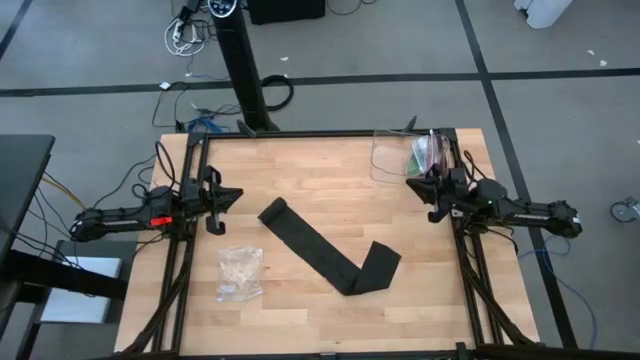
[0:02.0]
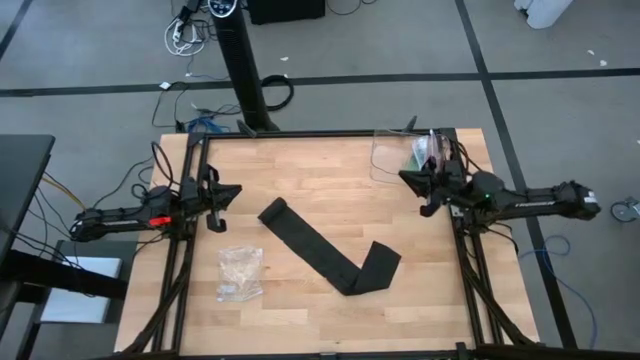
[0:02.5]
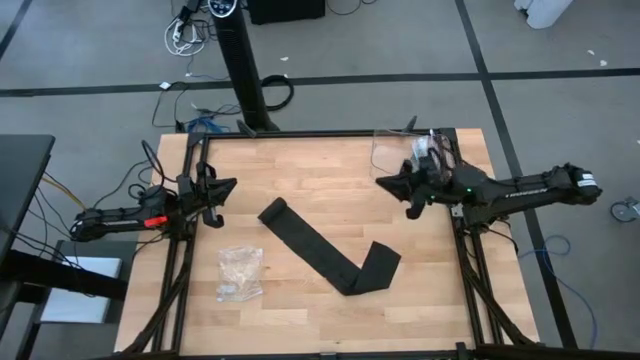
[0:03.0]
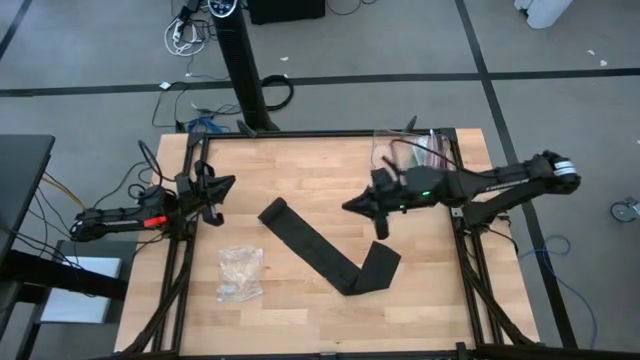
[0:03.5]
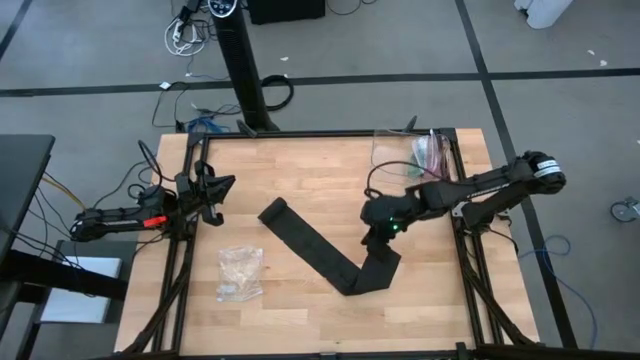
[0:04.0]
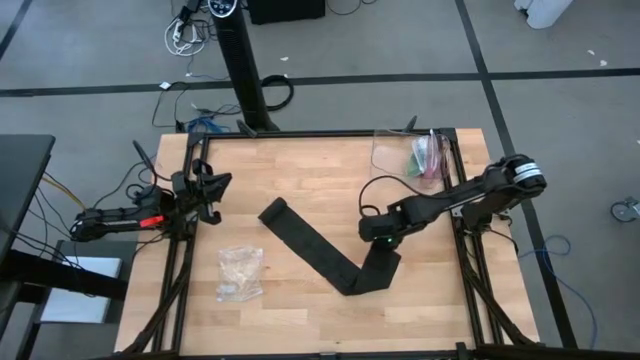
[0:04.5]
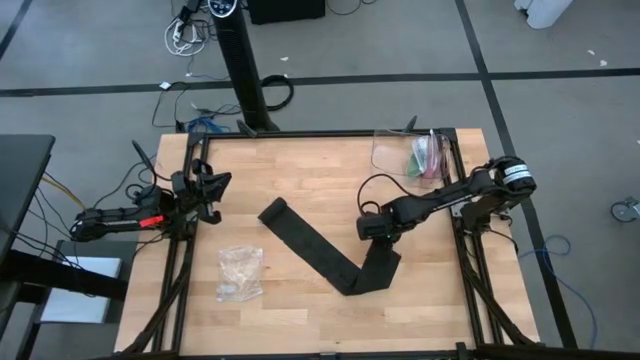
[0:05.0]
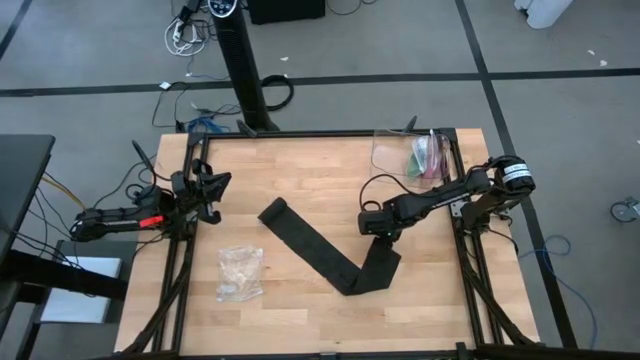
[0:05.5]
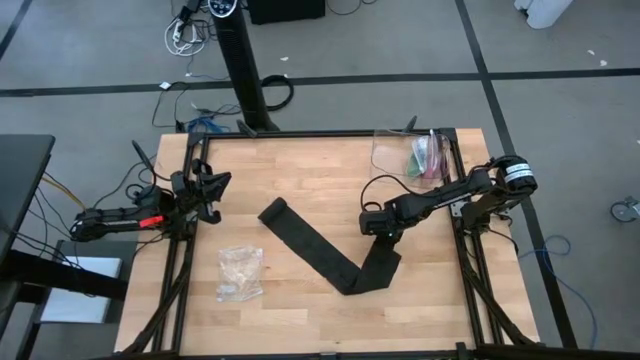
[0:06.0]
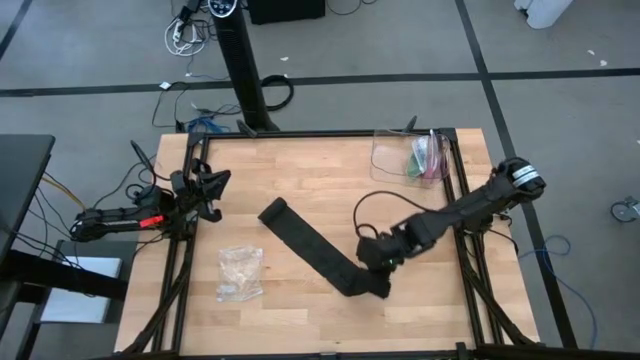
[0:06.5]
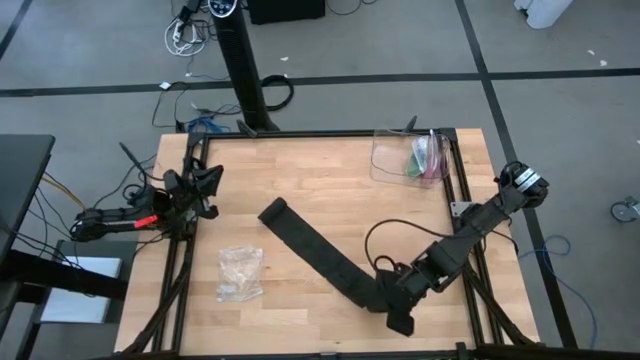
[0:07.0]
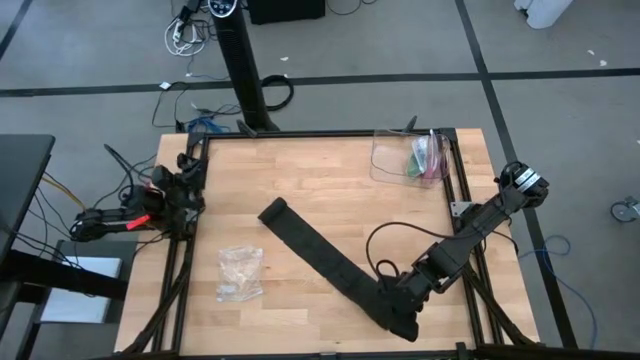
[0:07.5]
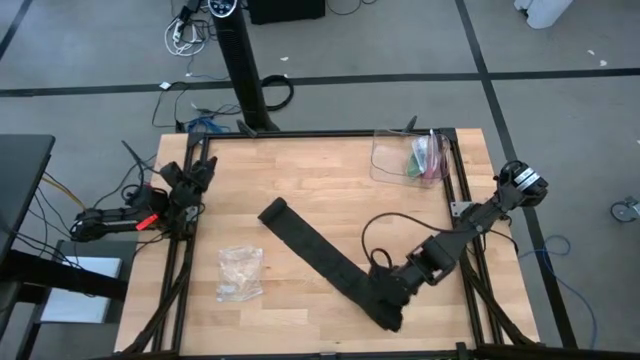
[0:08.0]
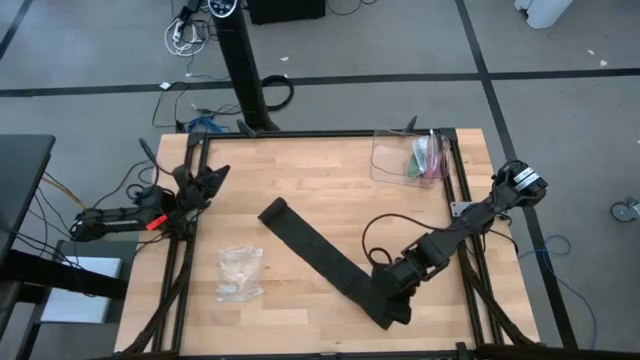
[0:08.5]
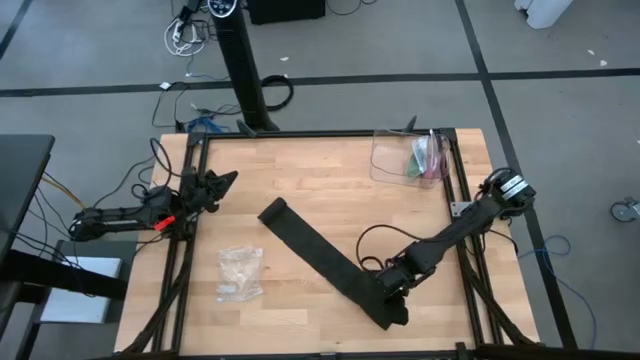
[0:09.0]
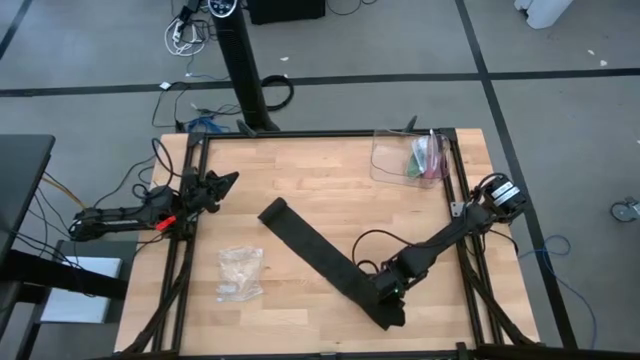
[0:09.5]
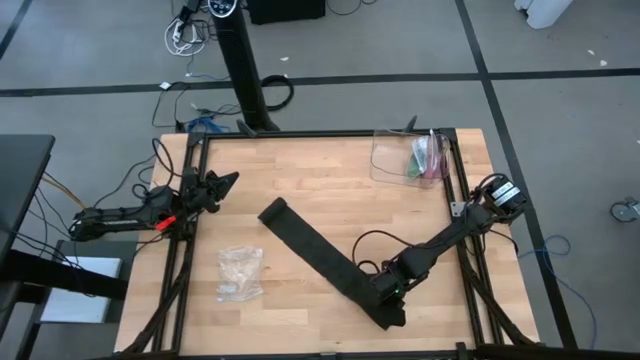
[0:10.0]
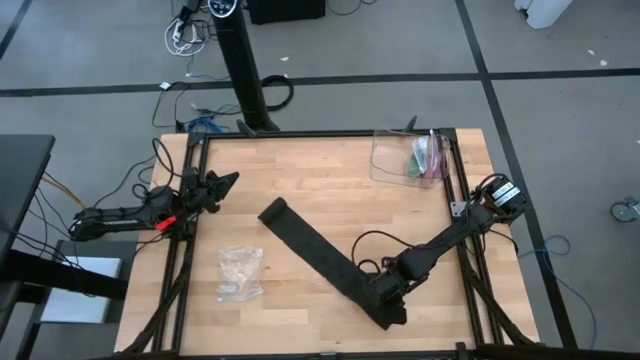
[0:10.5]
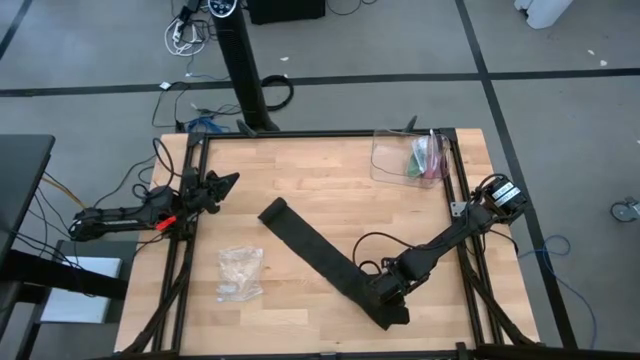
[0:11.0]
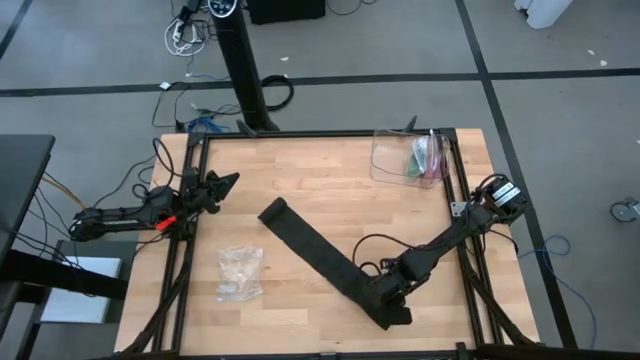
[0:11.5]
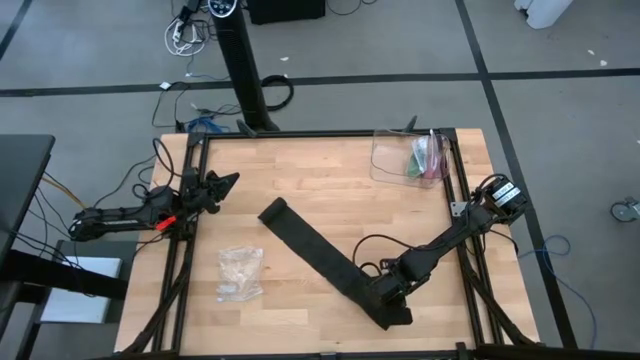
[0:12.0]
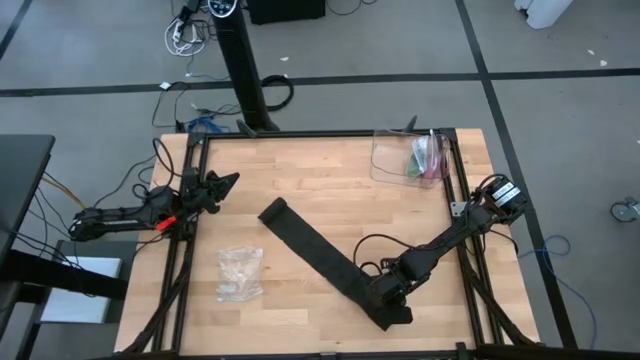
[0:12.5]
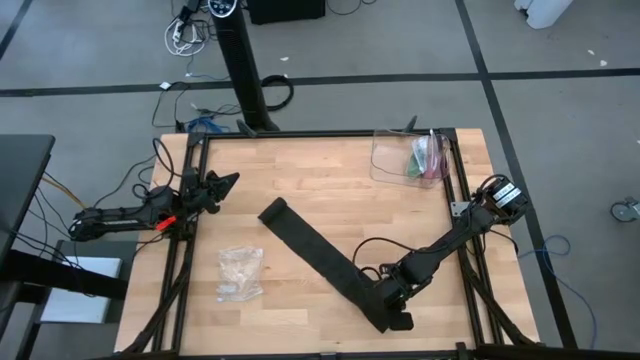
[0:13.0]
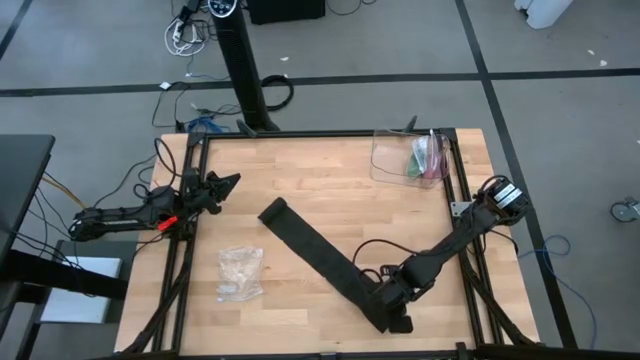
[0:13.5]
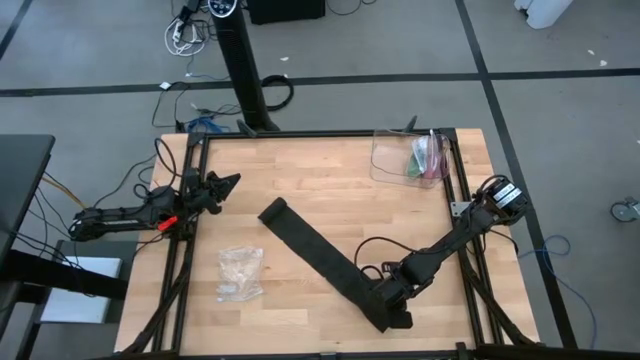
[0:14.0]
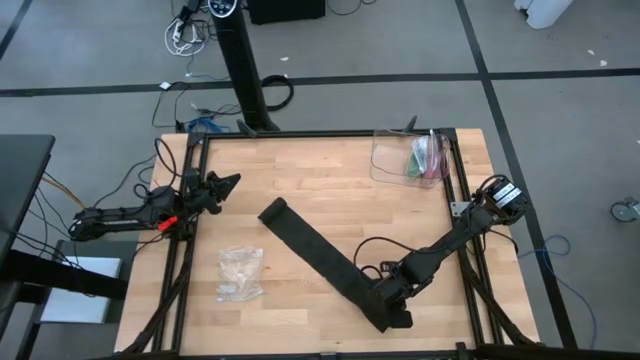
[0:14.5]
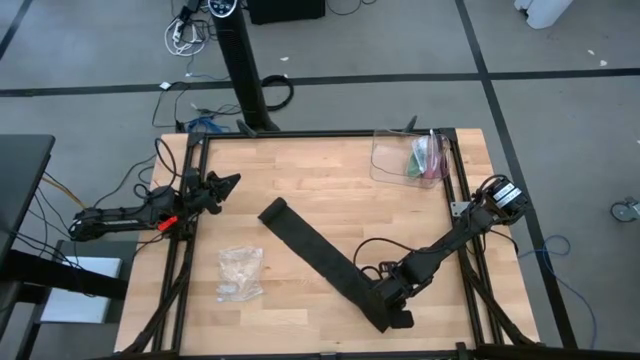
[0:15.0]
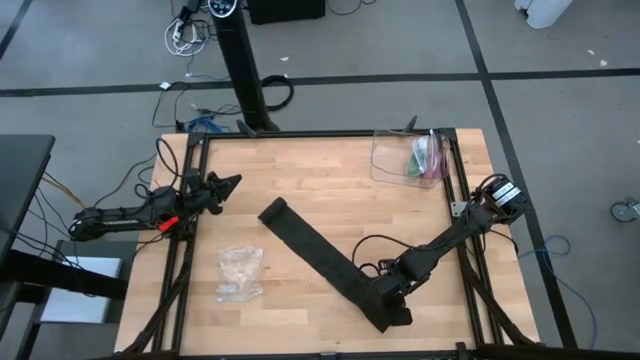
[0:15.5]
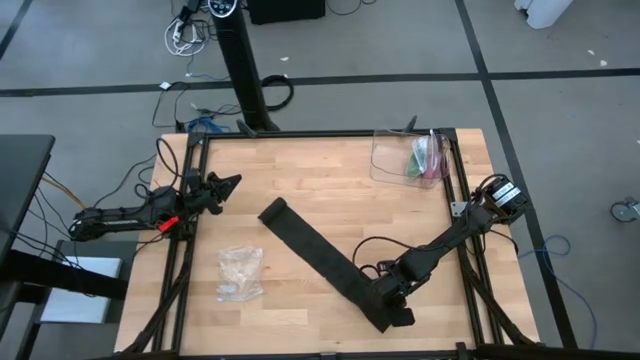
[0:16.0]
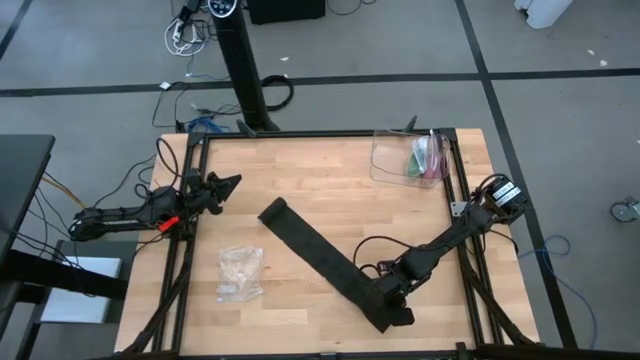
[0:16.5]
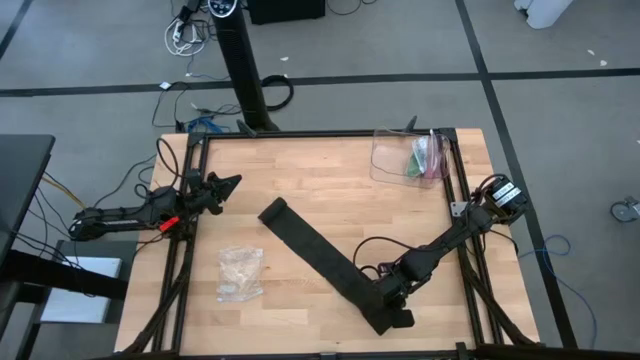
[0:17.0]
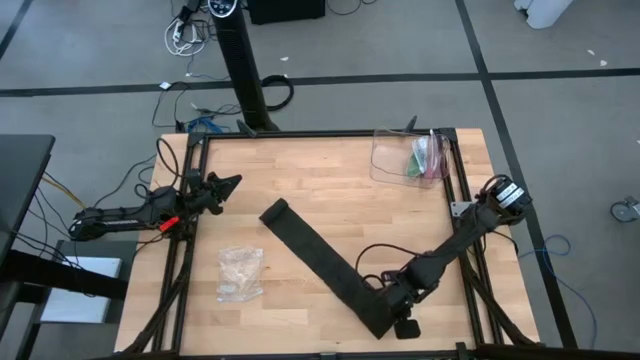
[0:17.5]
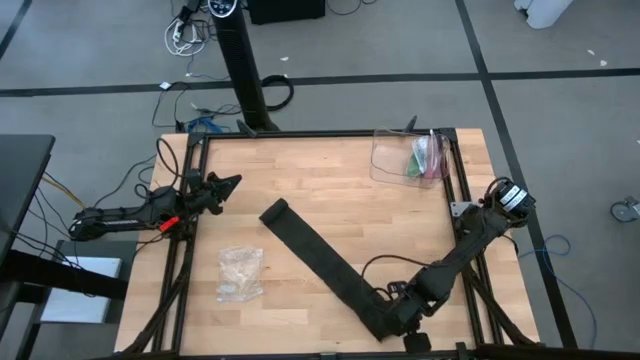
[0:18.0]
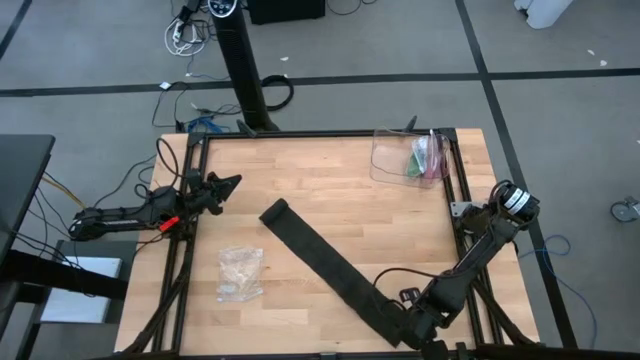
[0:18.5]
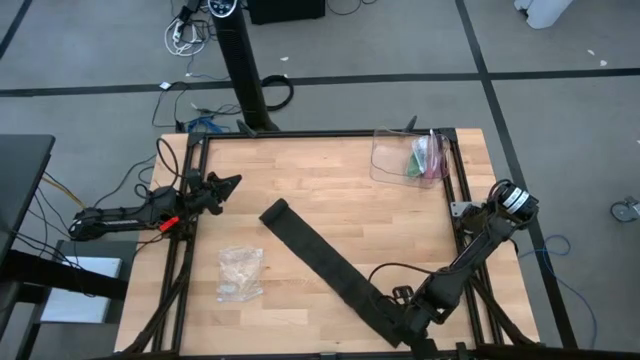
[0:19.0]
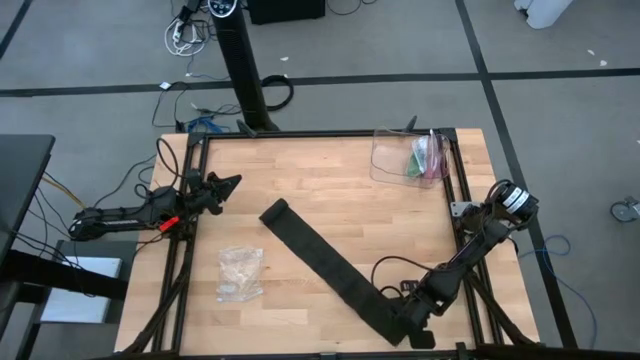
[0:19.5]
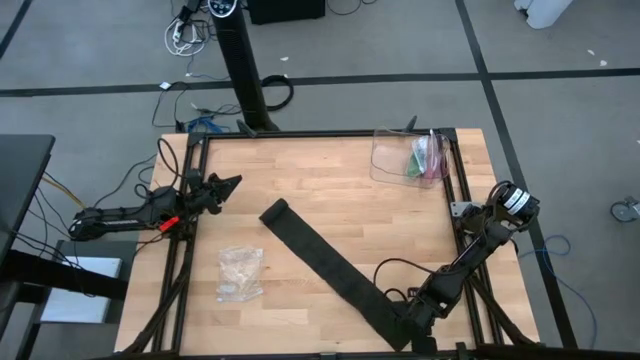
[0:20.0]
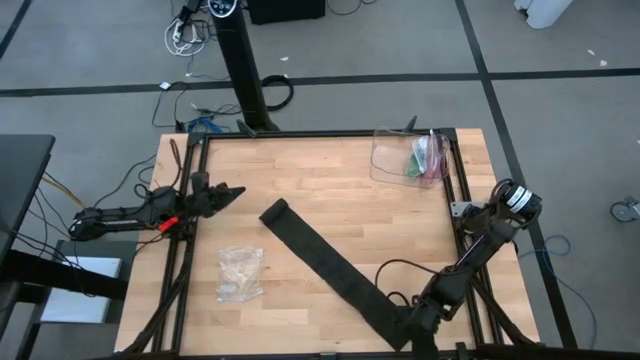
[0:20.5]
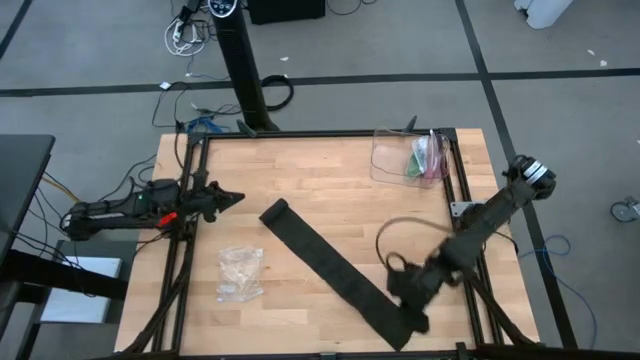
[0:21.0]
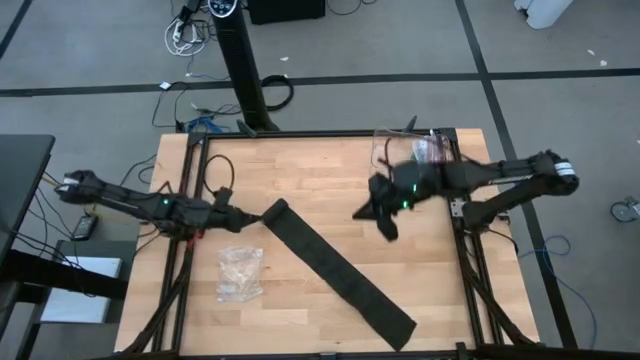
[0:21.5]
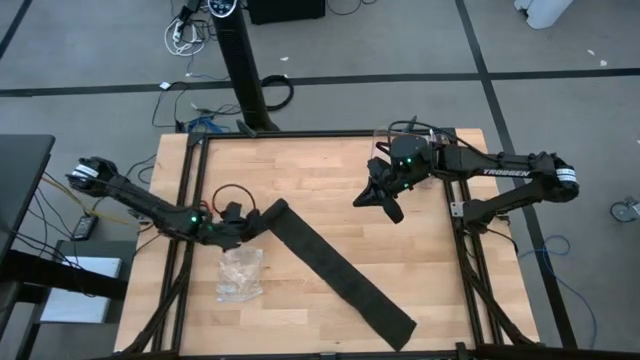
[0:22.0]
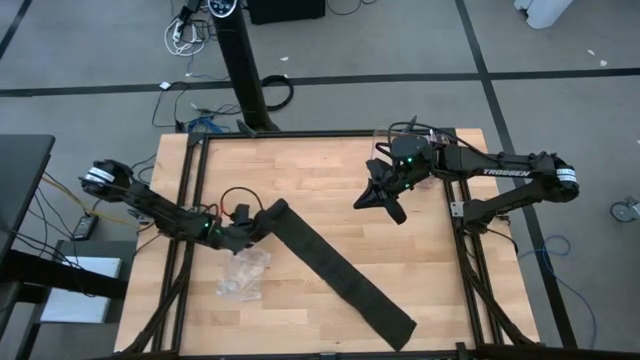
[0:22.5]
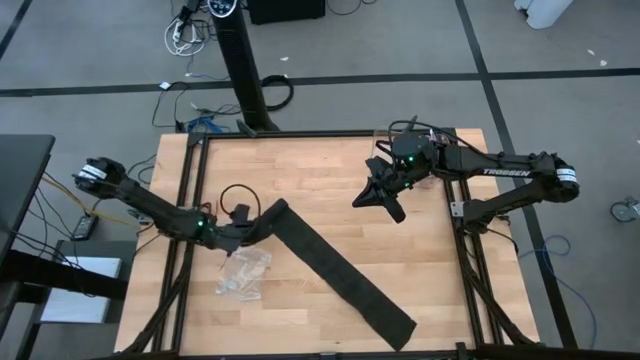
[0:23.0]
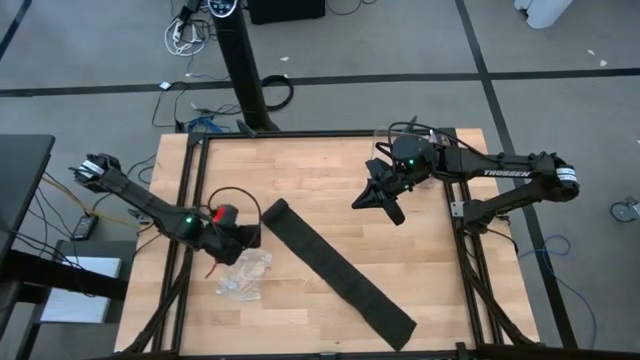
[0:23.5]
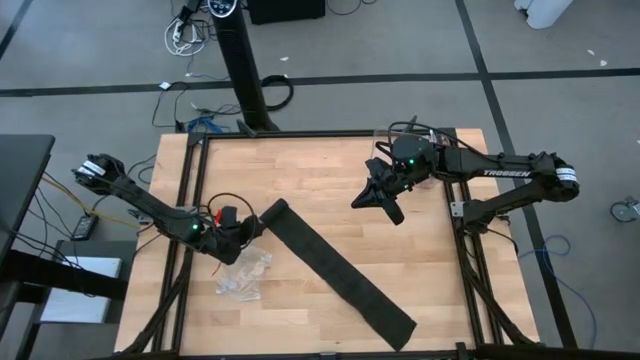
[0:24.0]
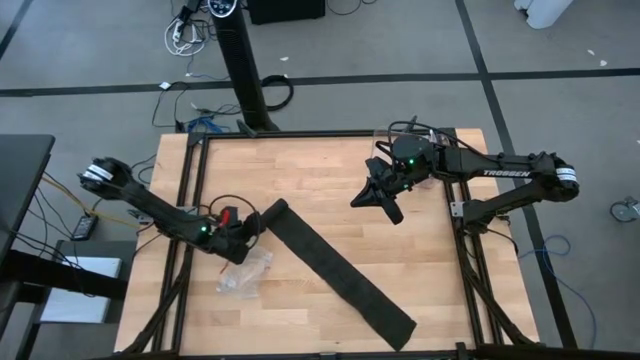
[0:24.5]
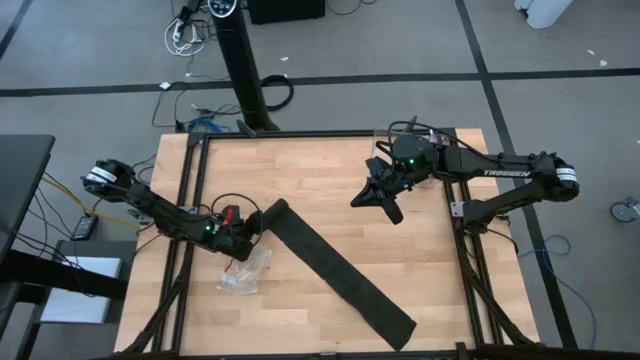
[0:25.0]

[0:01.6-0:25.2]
Task: Roll bandage
Roll the black bandage
